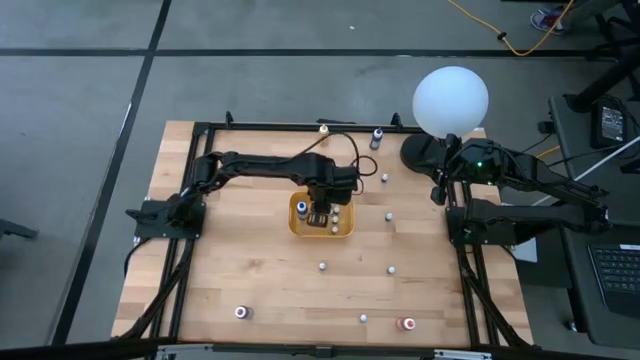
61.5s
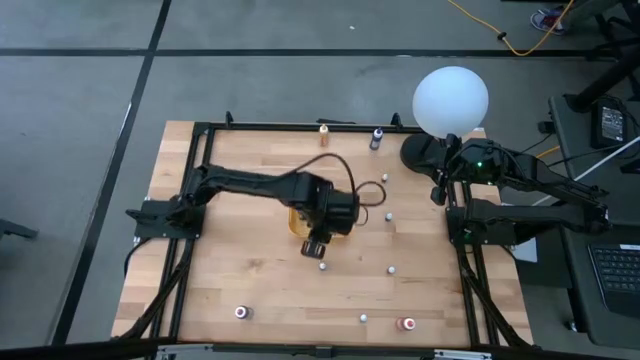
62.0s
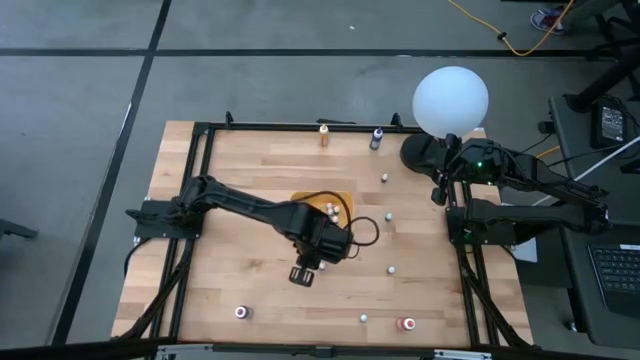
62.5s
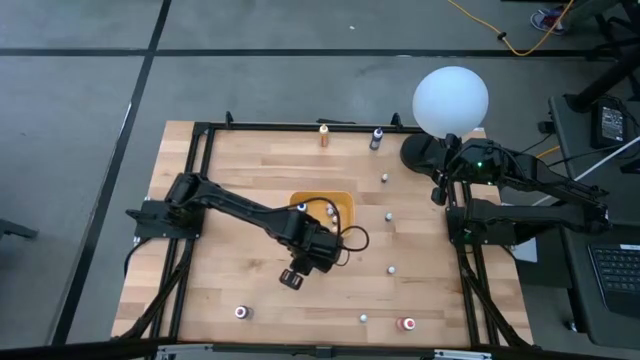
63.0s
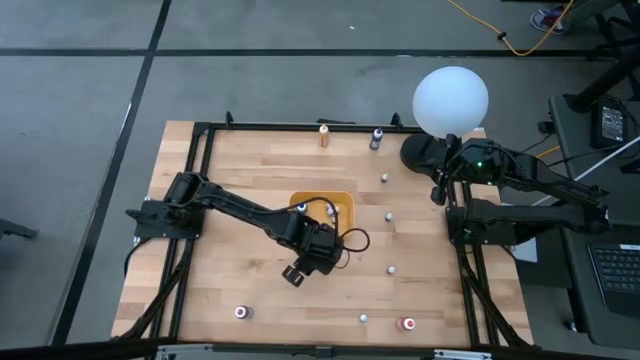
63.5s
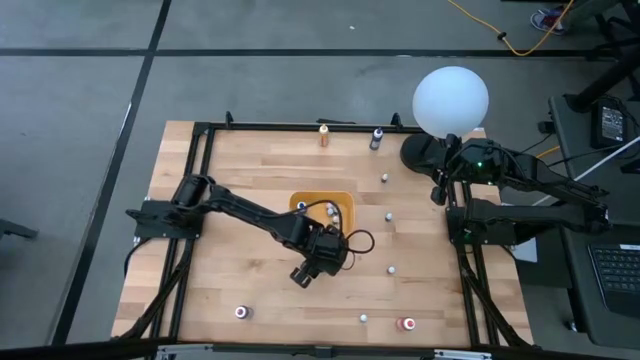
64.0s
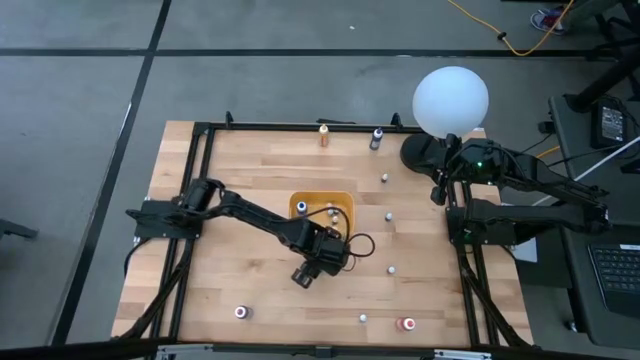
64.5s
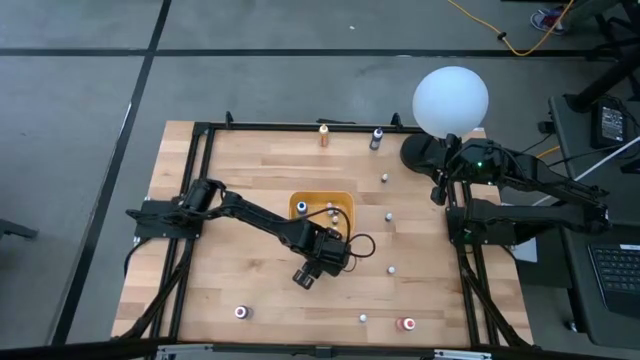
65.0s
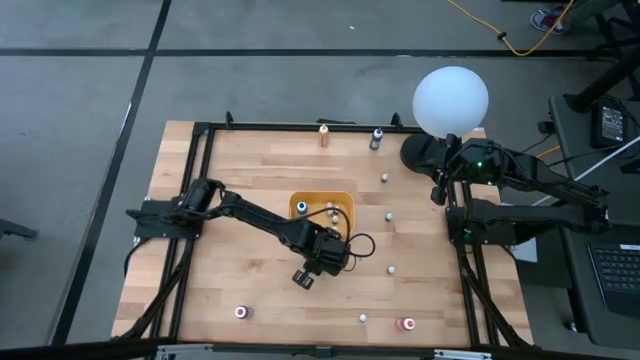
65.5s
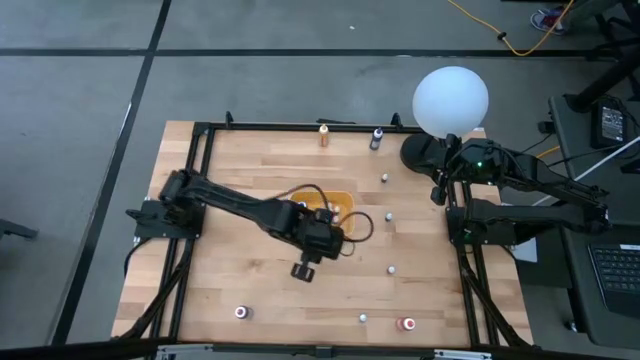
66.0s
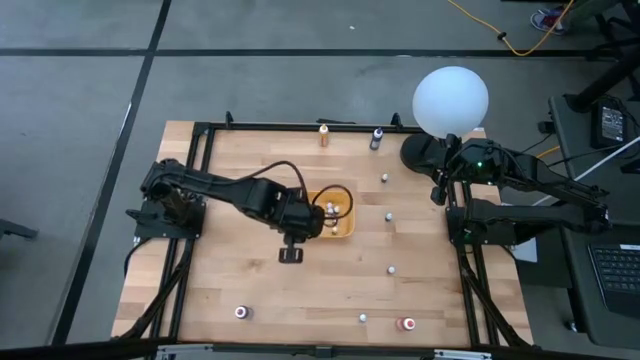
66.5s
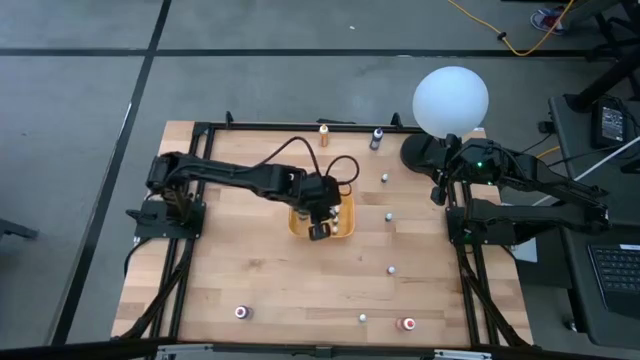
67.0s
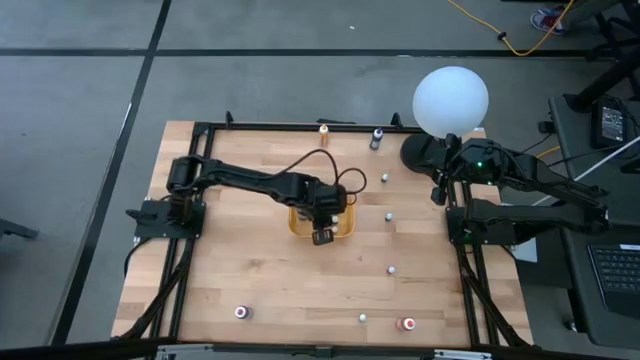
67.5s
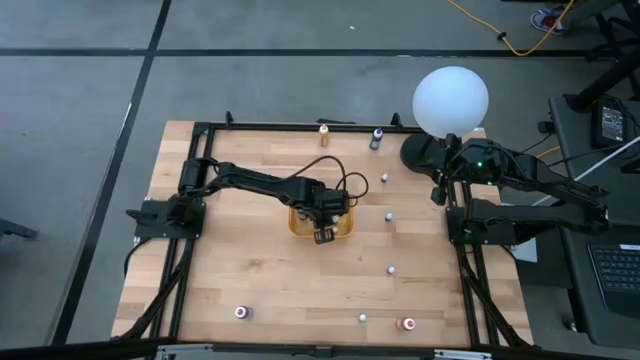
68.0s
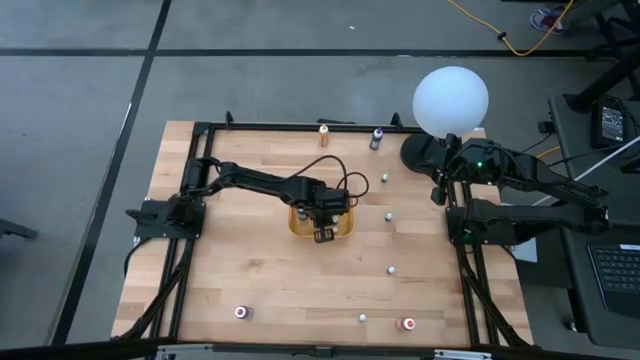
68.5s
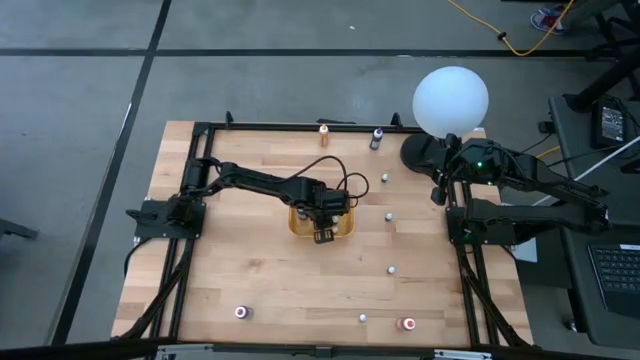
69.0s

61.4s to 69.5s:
Task: Pick & Place food coloring
Put the red food coloring bottle into the yellow bin

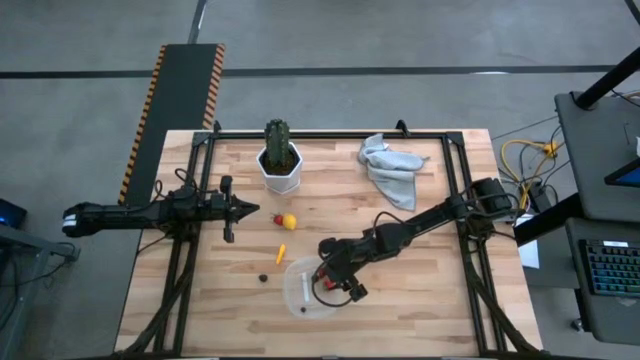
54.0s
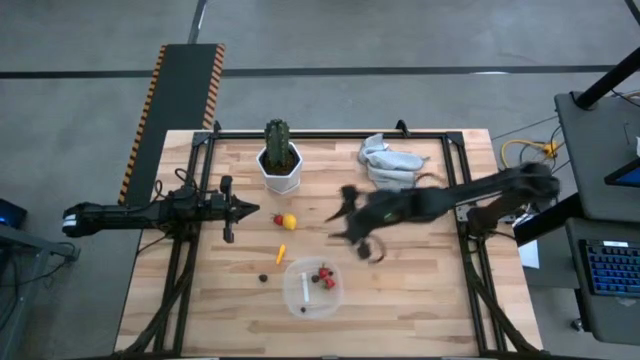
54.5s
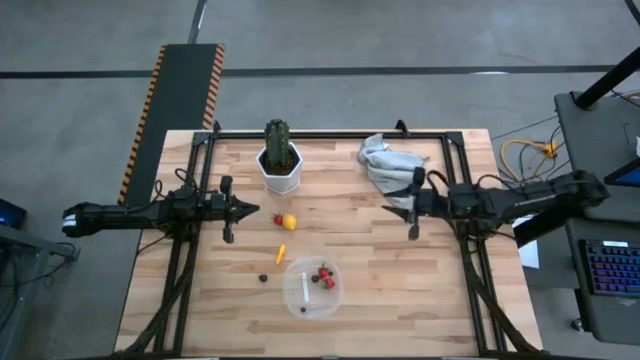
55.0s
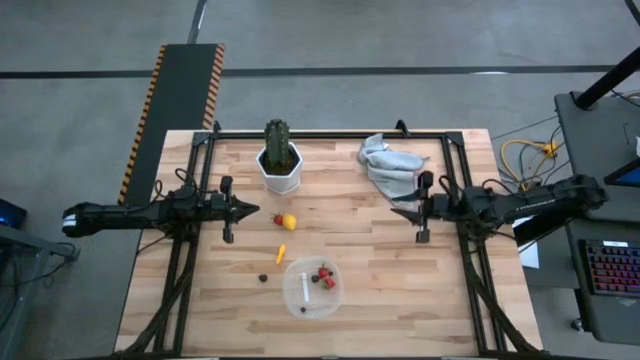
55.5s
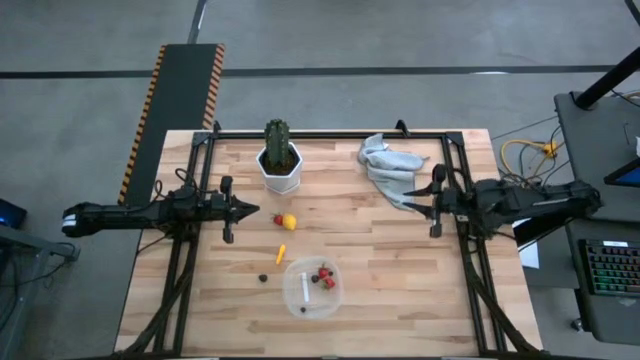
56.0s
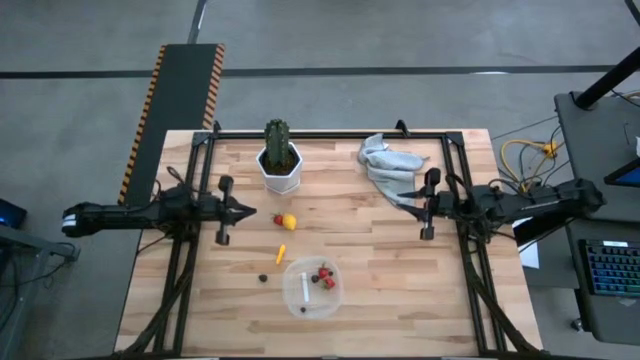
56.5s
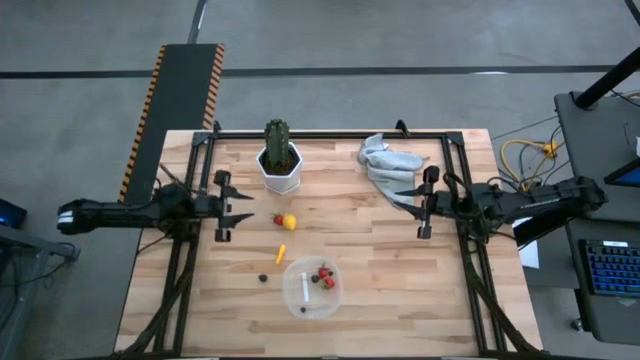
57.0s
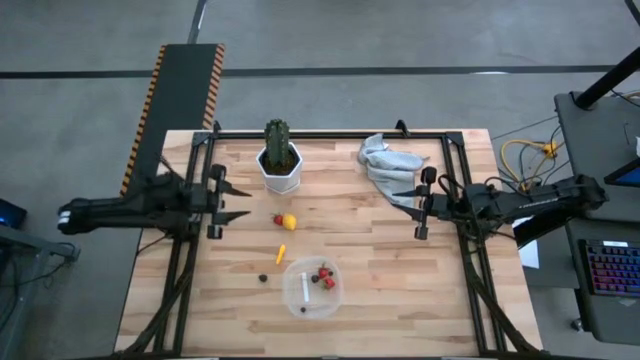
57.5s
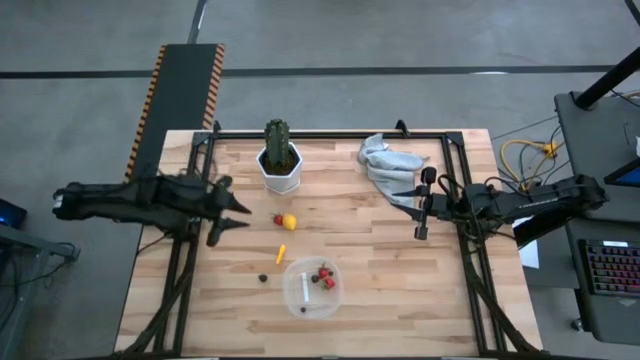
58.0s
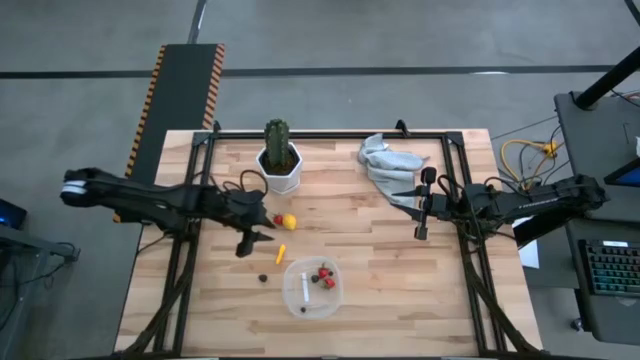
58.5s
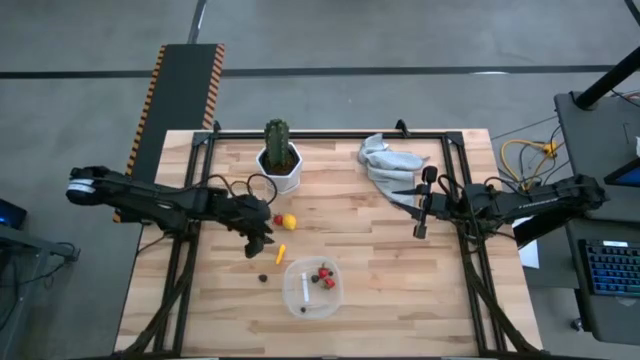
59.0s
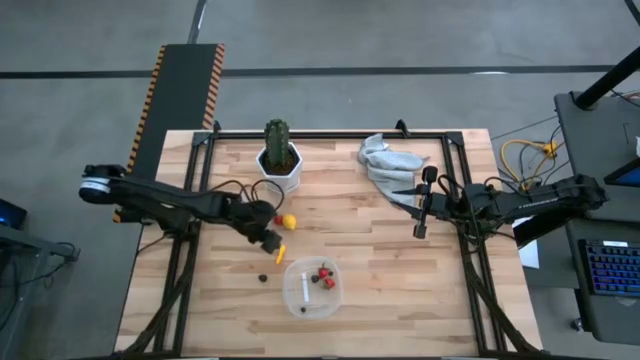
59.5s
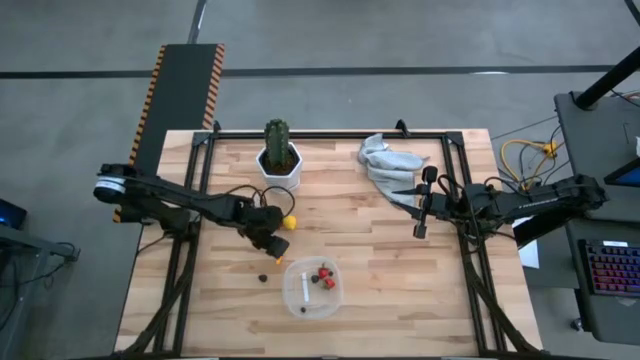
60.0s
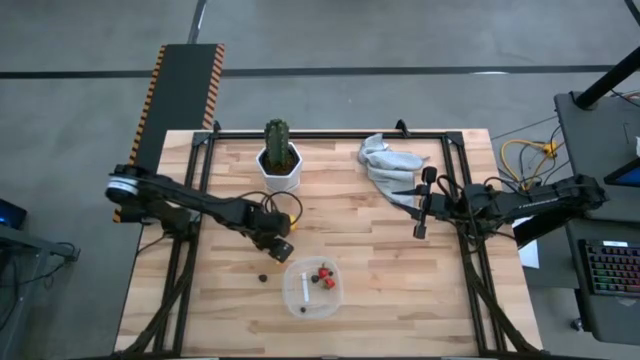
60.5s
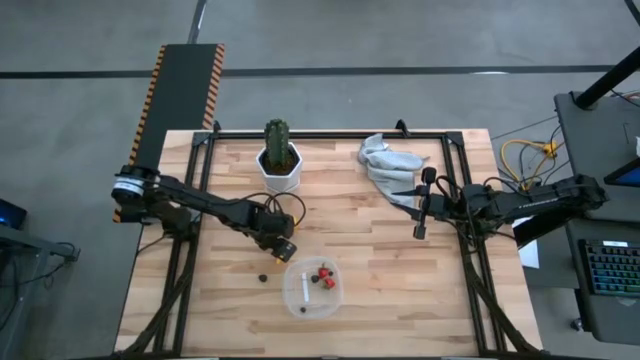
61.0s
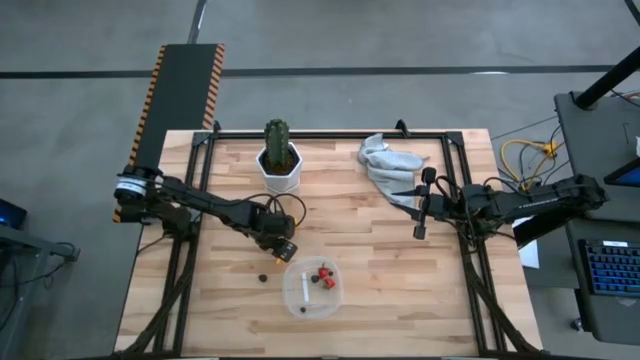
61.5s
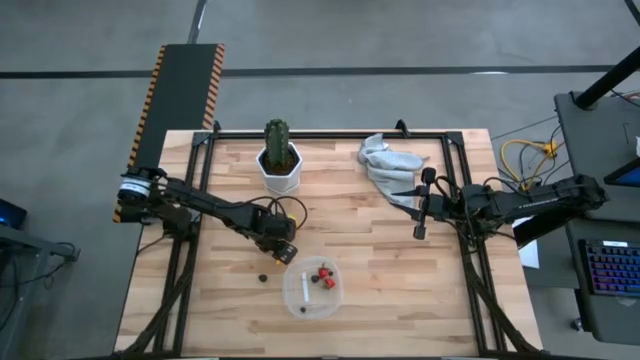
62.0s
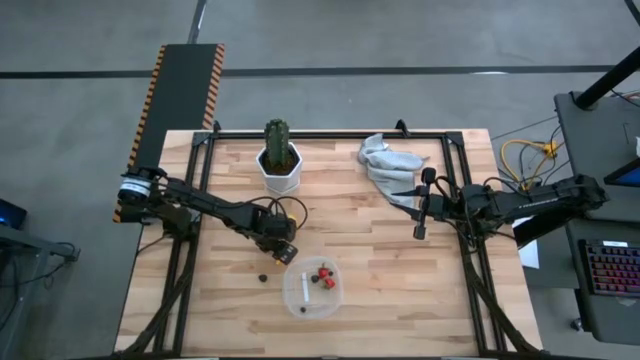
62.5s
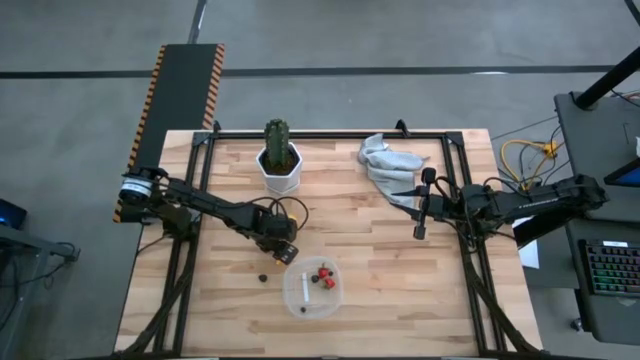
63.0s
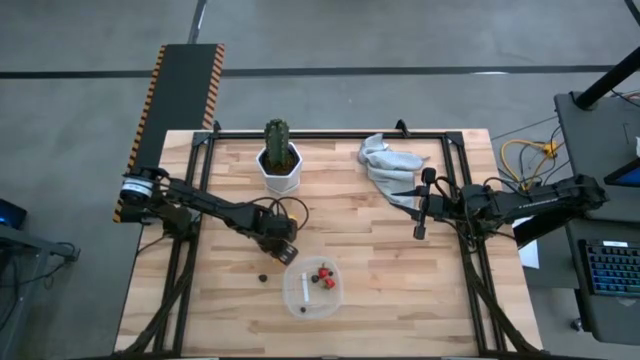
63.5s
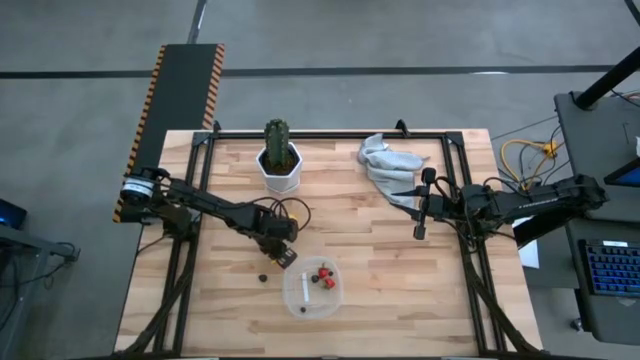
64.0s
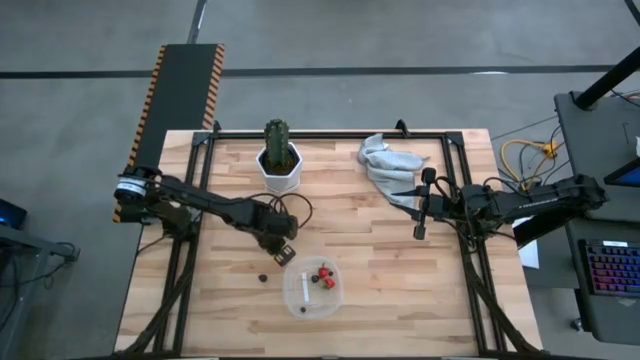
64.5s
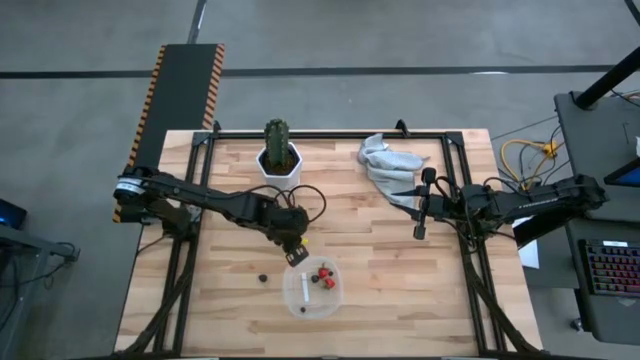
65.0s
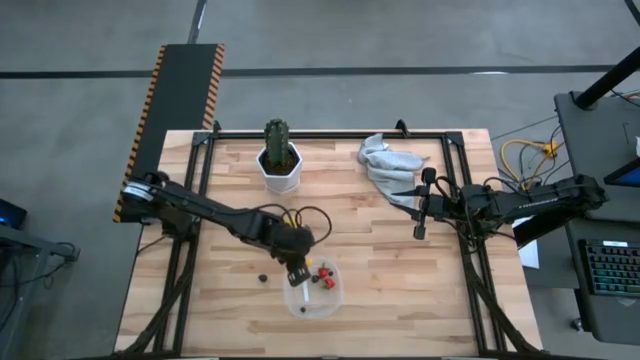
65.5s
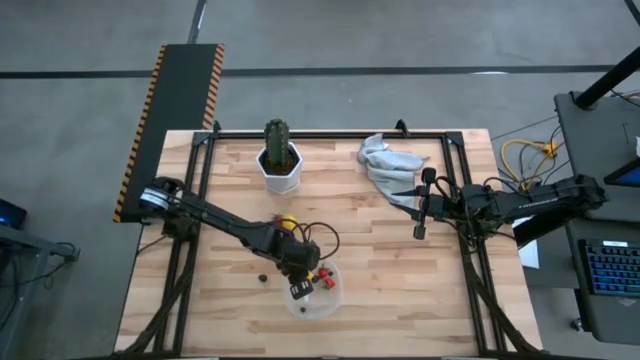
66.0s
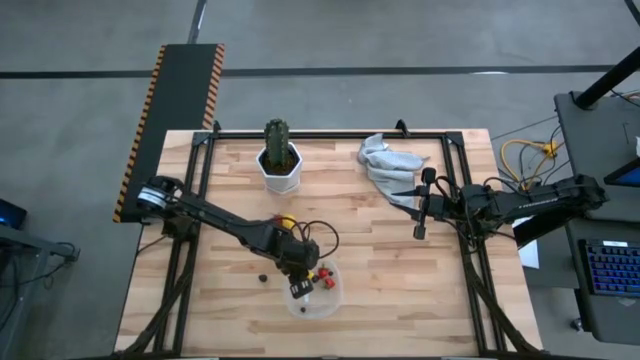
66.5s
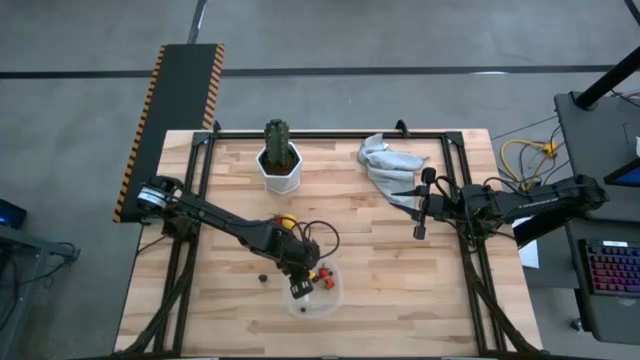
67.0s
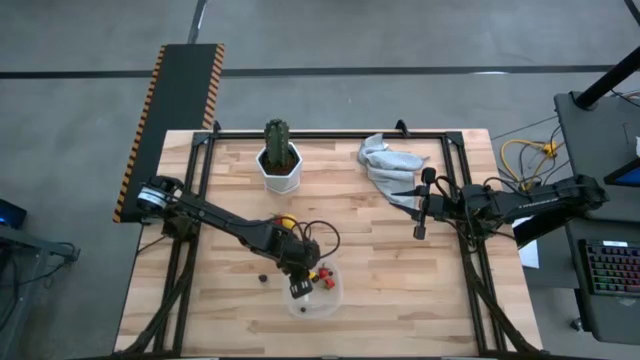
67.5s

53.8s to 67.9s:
Task: Pick and placing Produce into tupperware
Put the yellow corn into the transparent container
